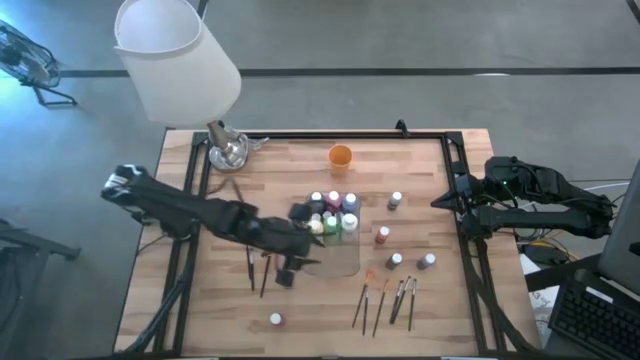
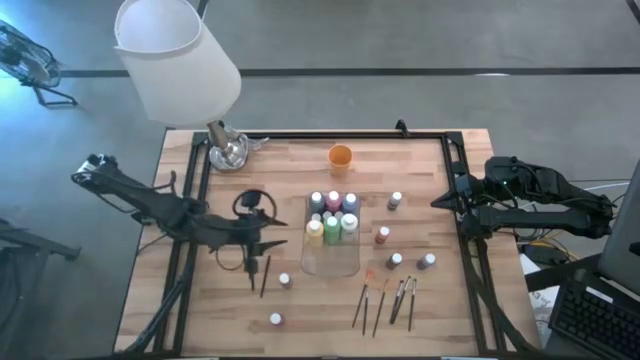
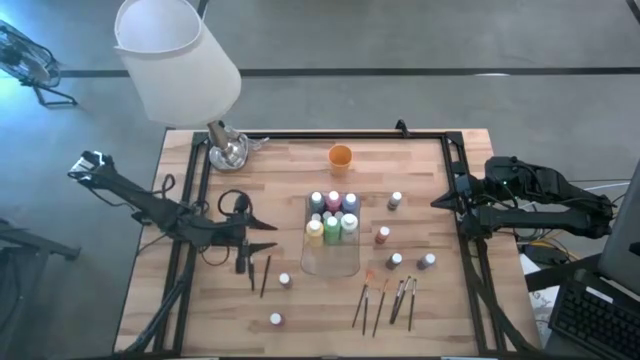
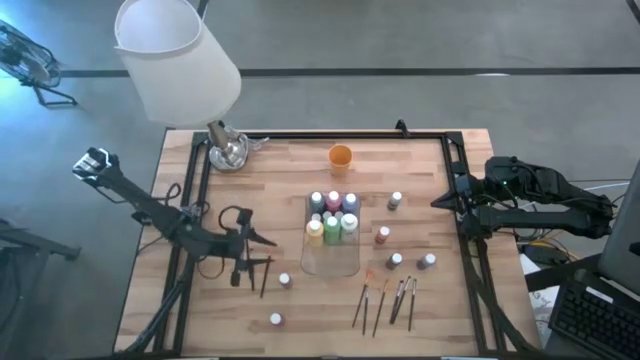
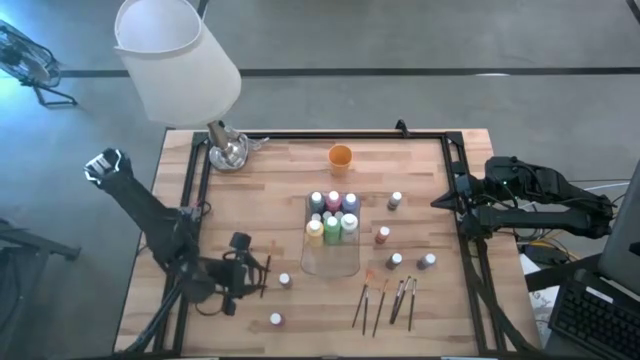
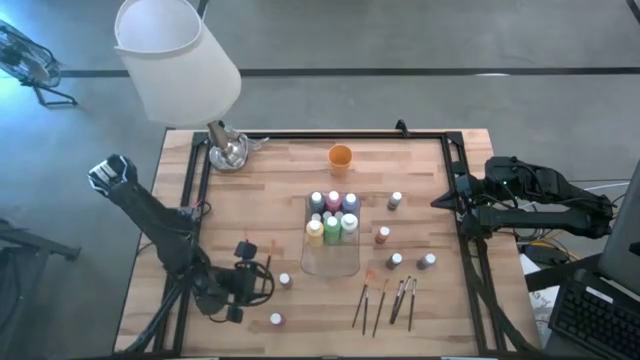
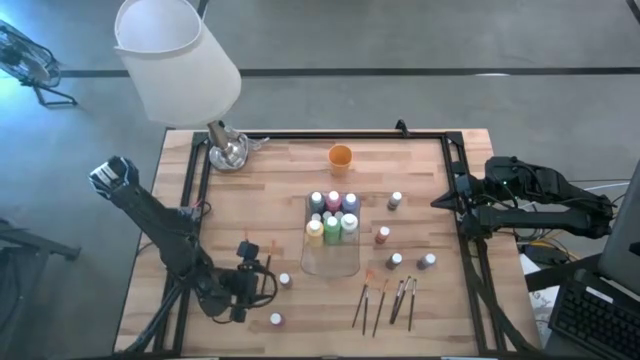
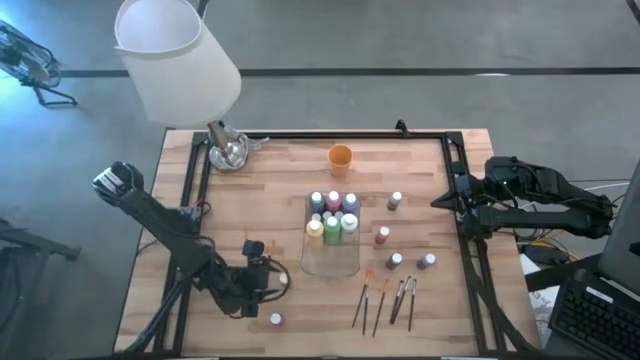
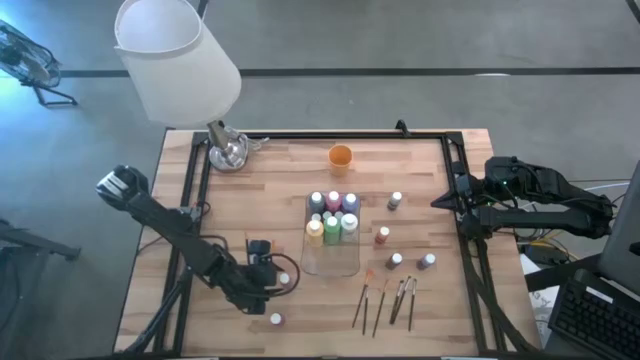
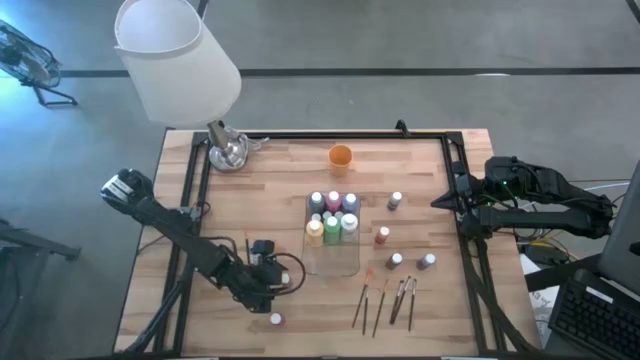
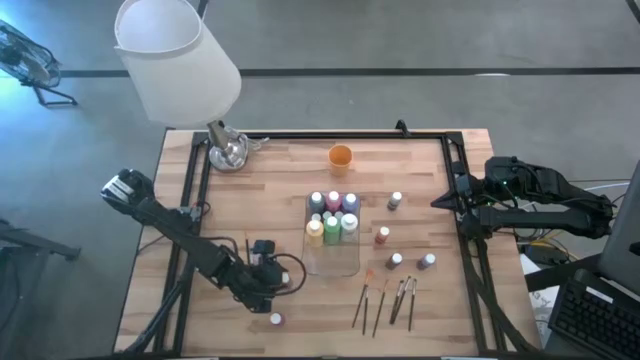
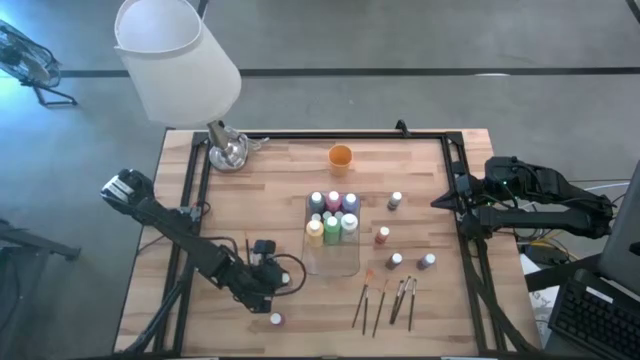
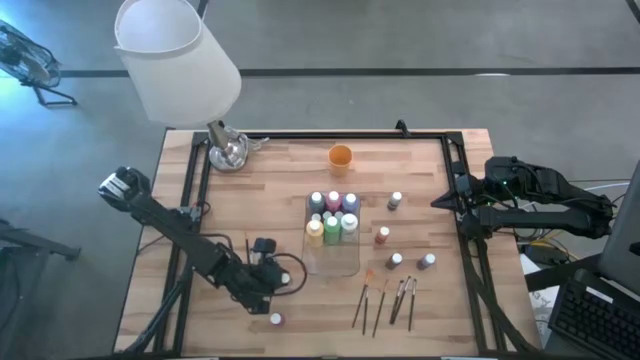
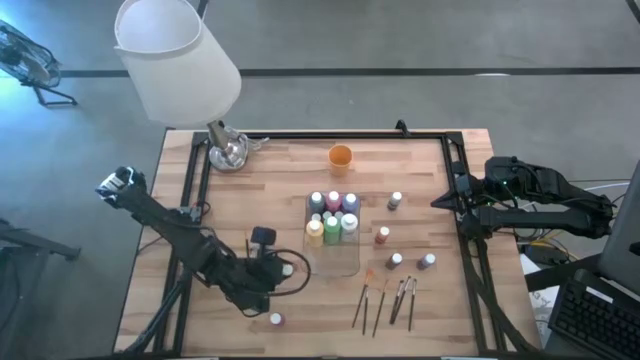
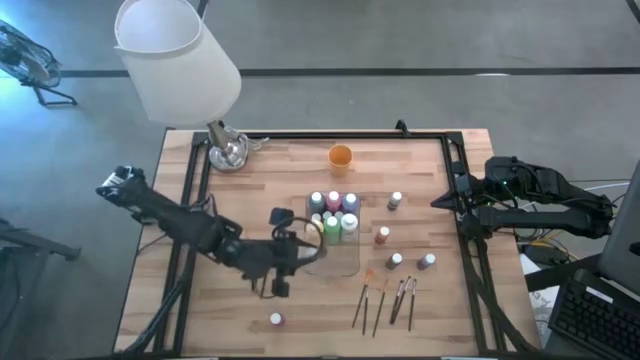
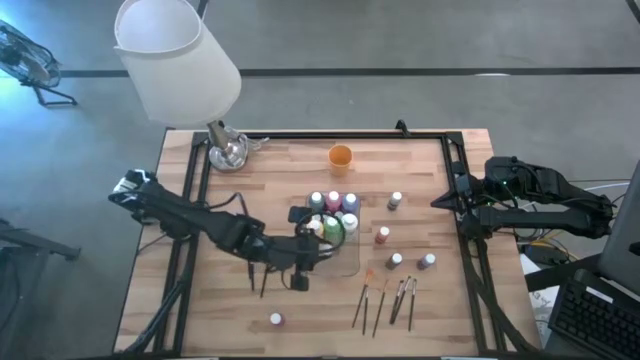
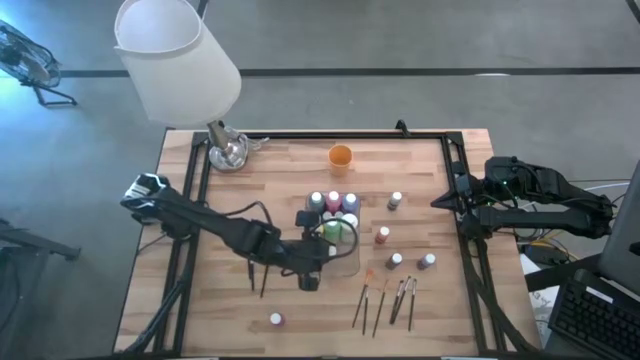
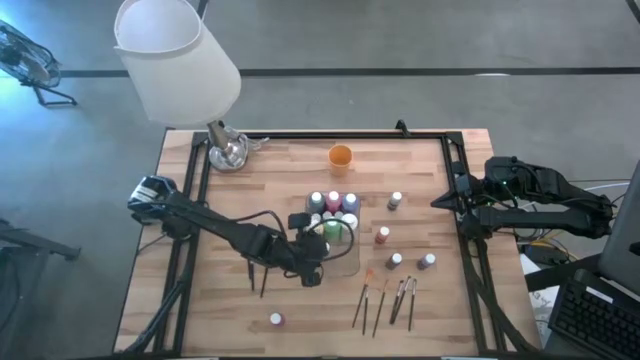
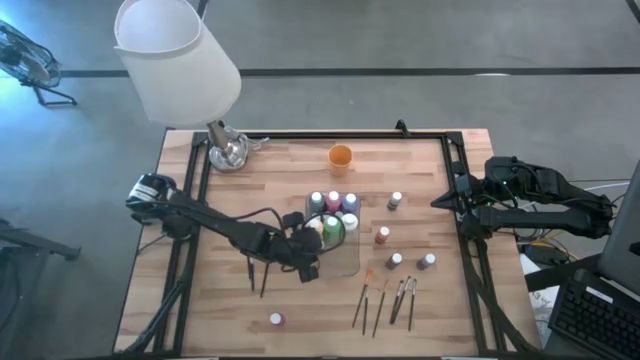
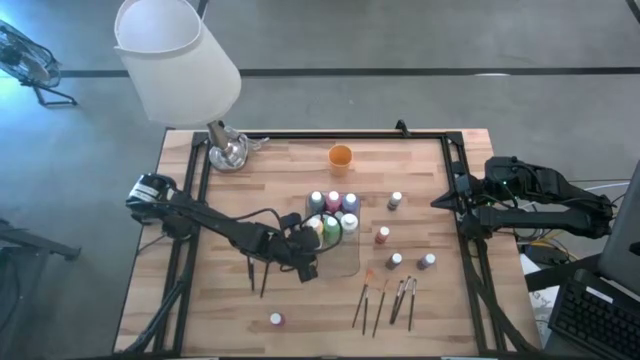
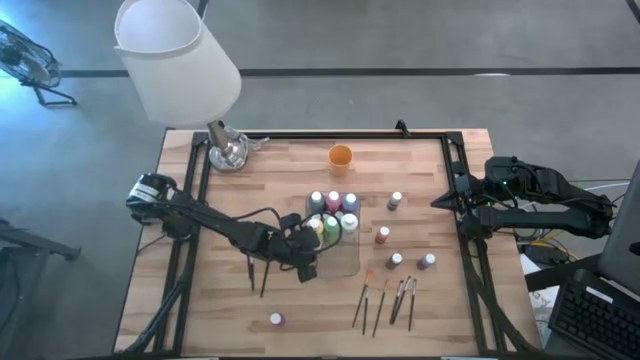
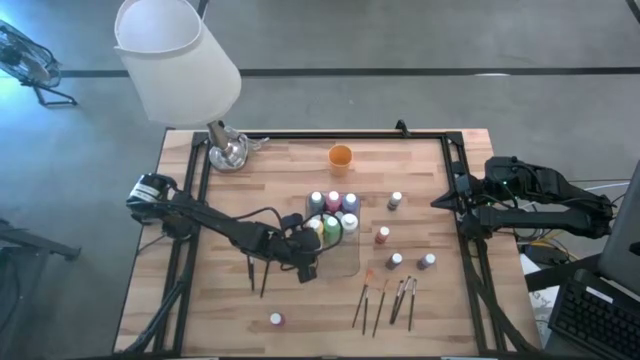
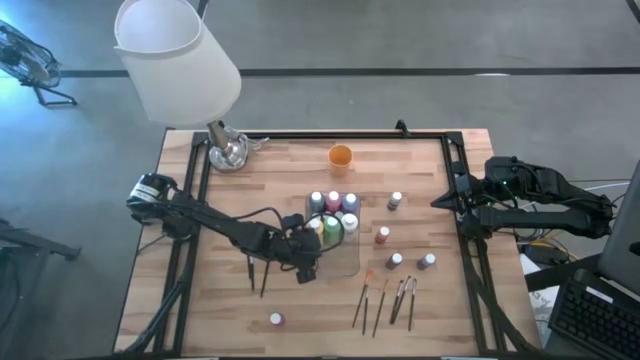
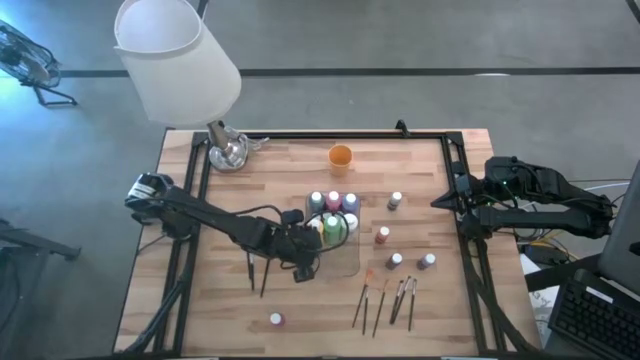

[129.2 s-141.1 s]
Task: Pick & Place Paint Supplies
Put the brown paint bottle into the transparent bin

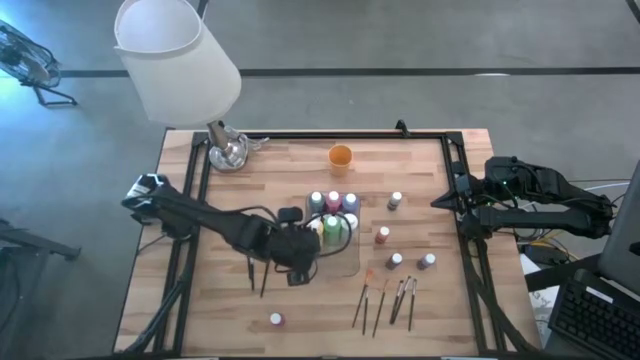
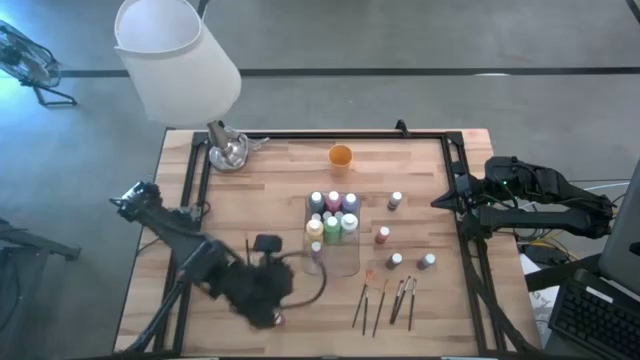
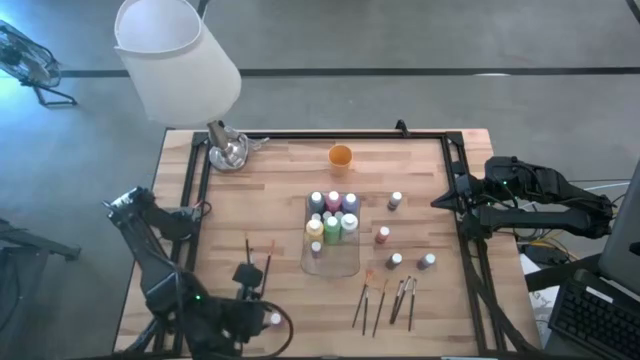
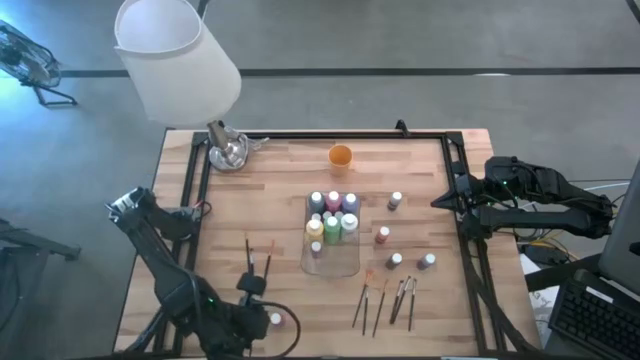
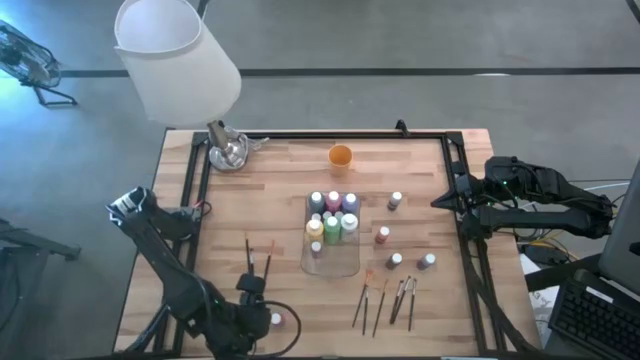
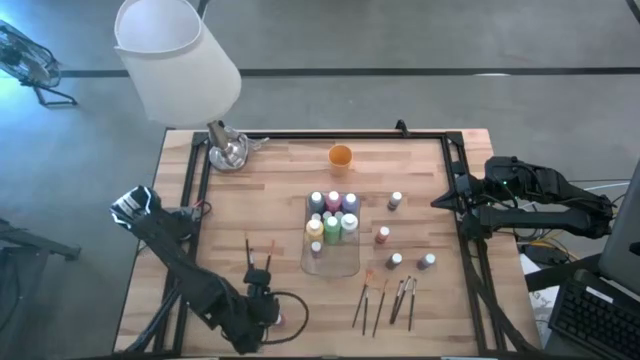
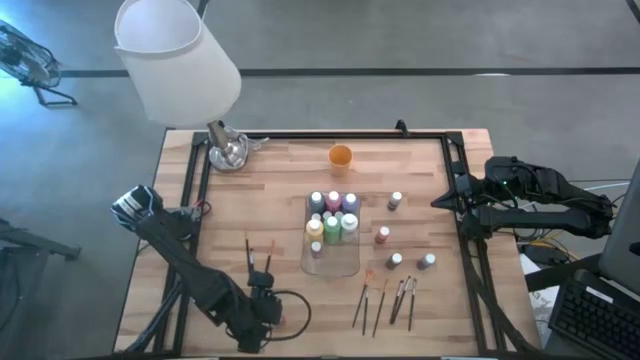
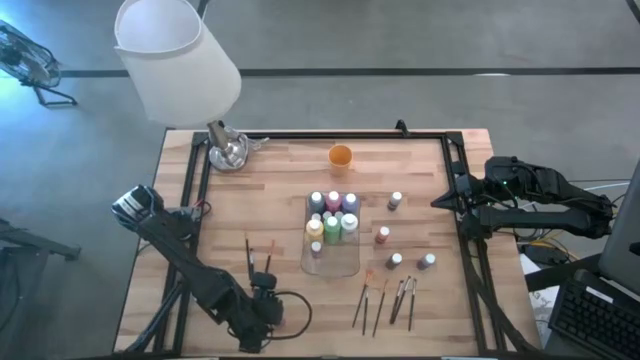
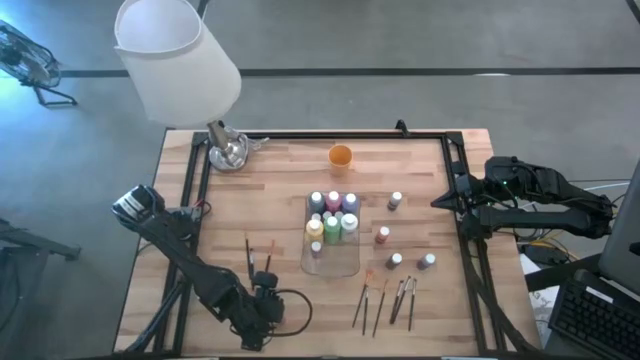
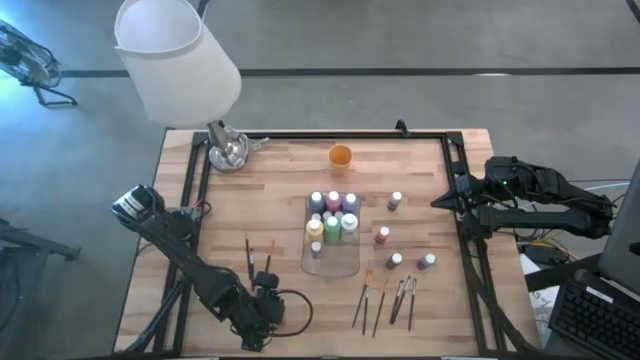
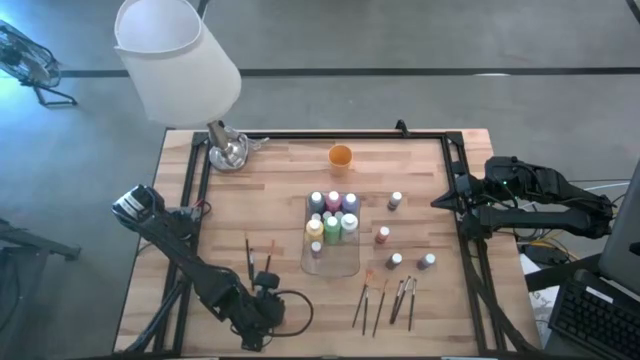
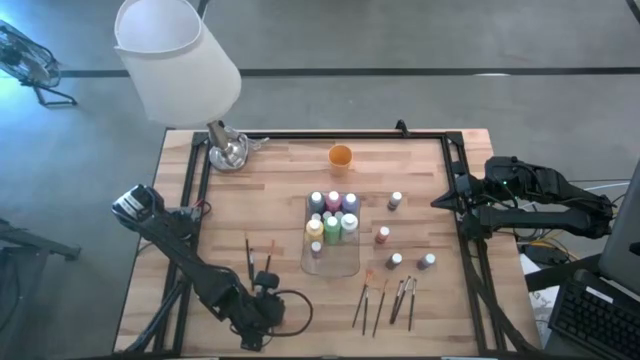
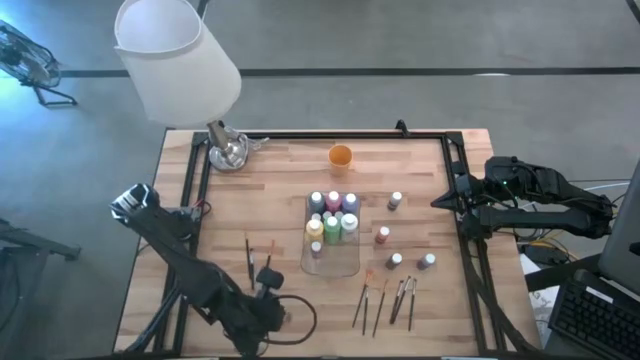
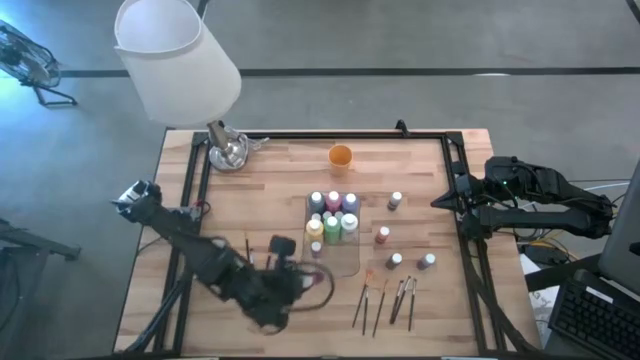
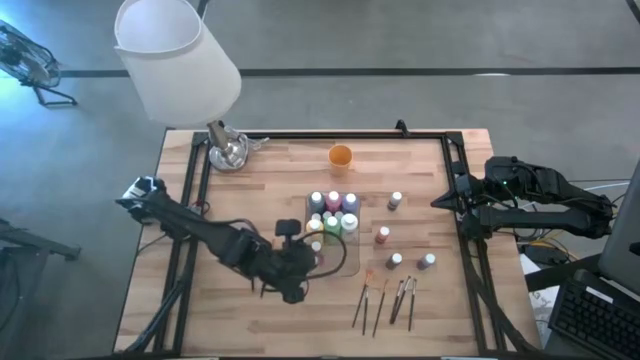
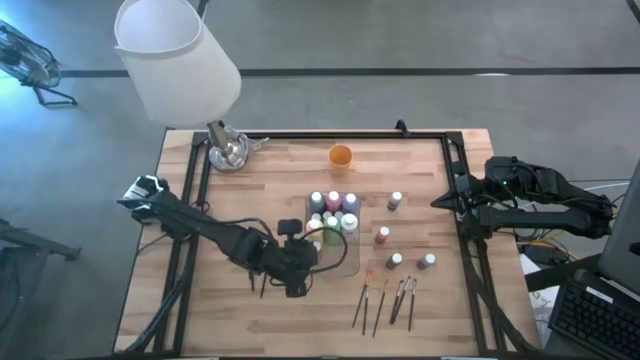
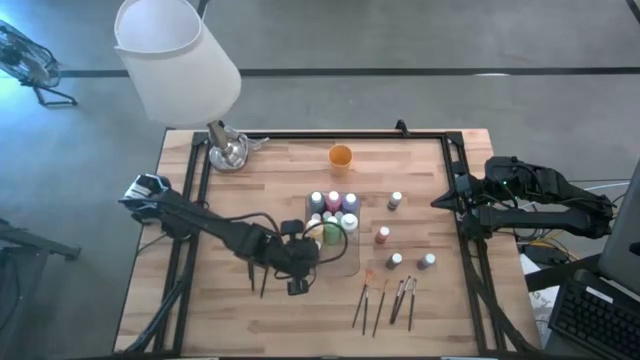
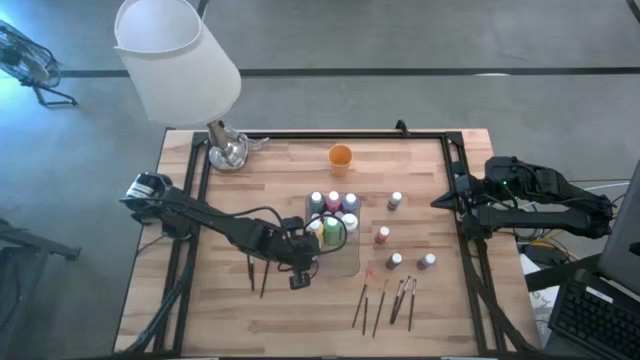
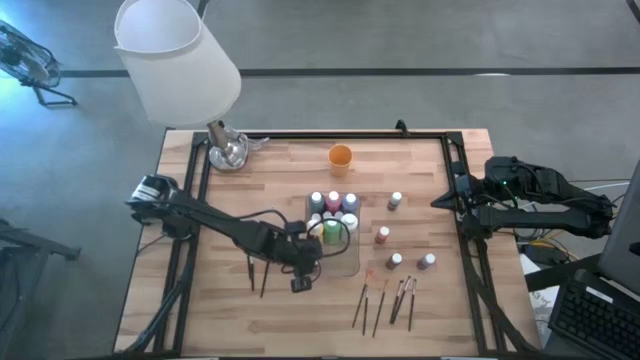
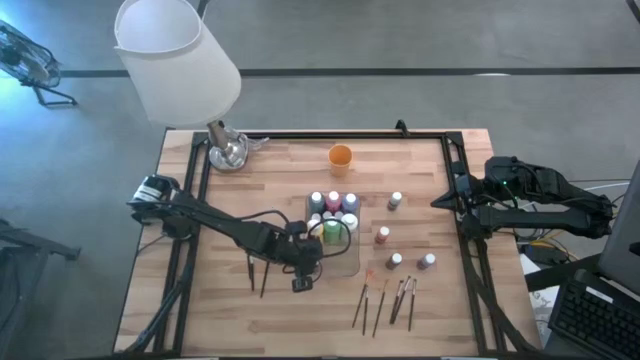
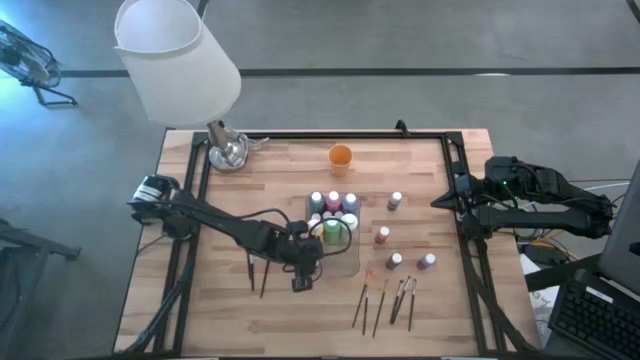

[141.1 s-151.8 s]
Put the pink paint bottle into the transparent bin

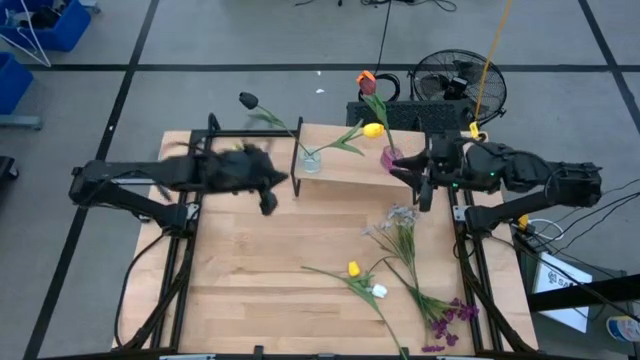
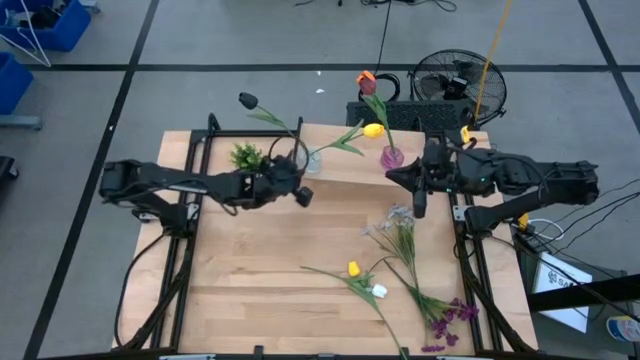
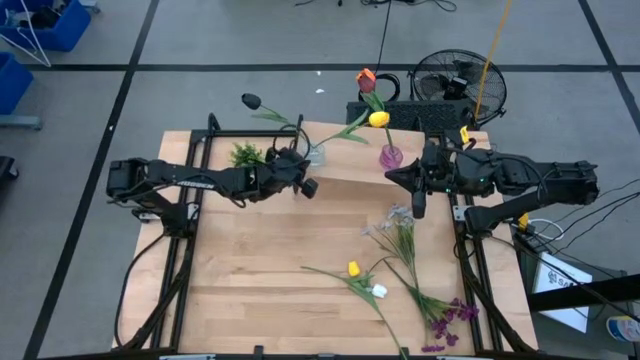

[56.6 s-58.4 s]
Task: Pick and place flowers into a vace then onto a shelf
Adjust the transparent vase on the shelf
